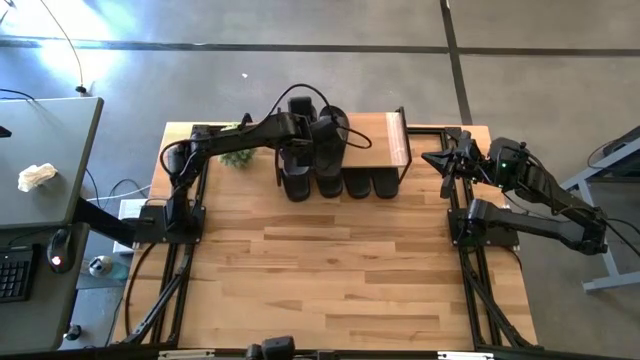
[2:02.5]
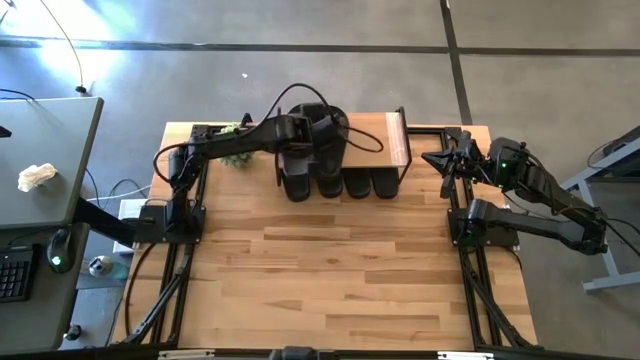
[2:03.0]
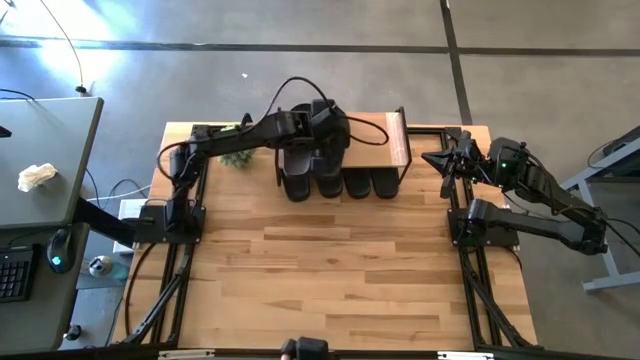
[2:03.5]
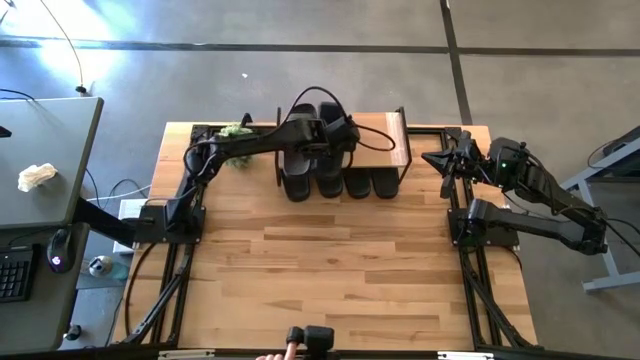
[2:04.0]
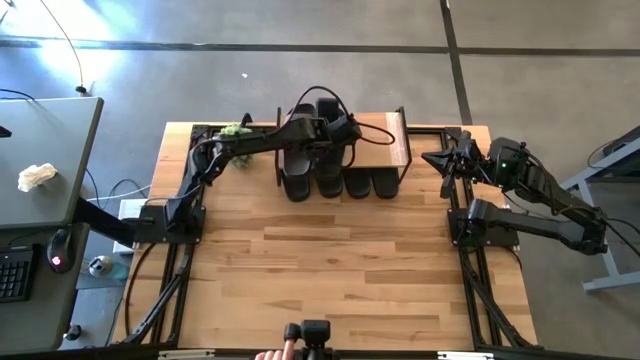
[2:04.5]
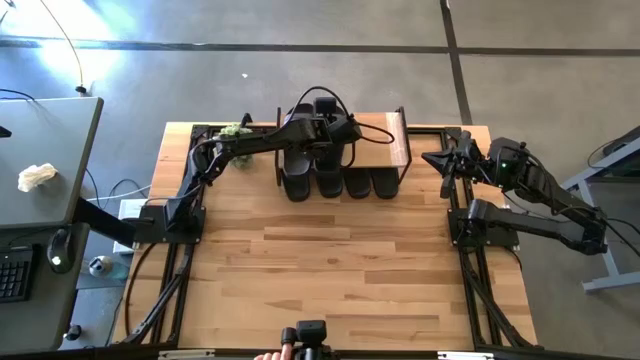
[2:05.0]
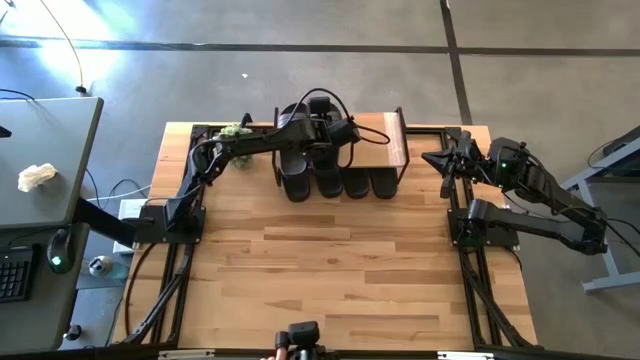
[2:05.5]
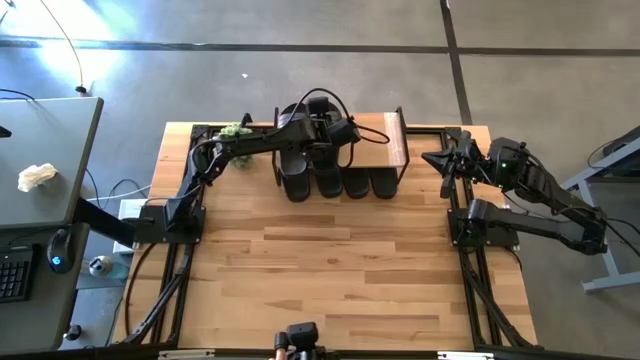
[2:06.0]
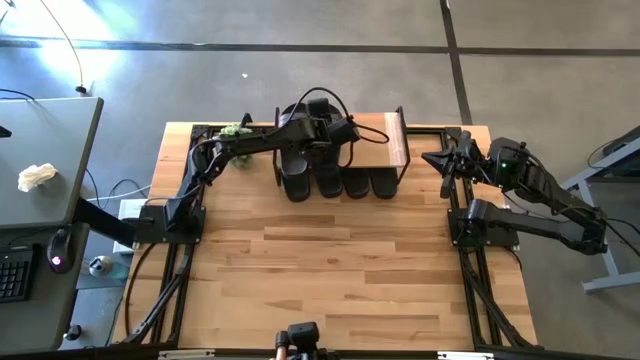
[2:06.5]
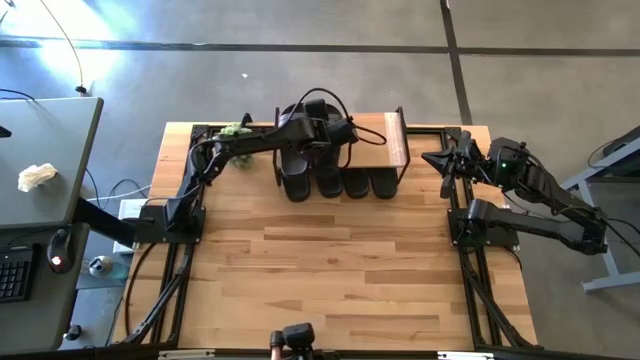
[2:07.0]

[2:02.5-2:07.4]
Task: Pick and place slides into the shelf
Adjust the black slipper on the shelf

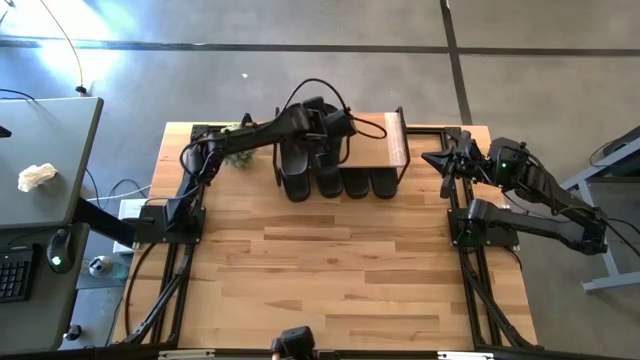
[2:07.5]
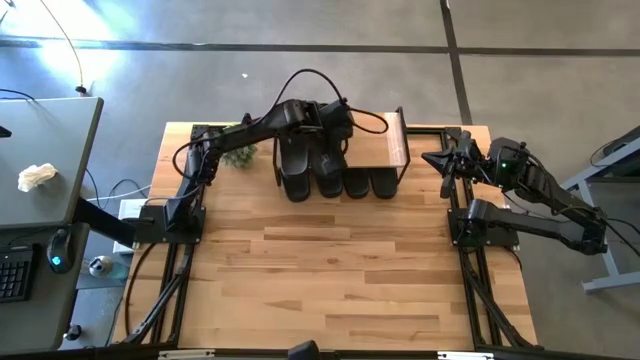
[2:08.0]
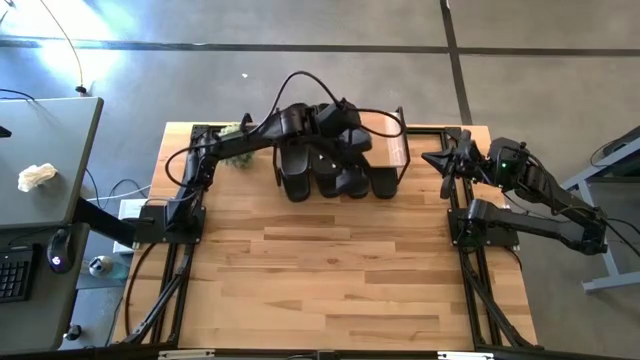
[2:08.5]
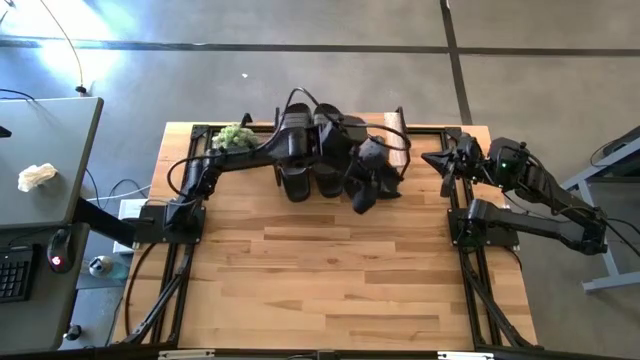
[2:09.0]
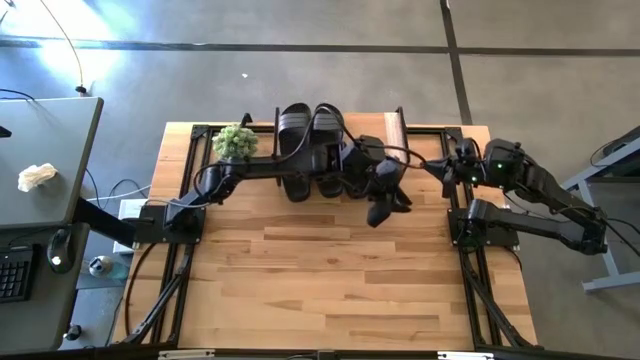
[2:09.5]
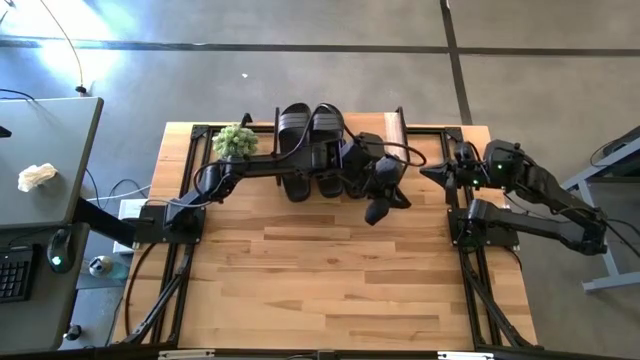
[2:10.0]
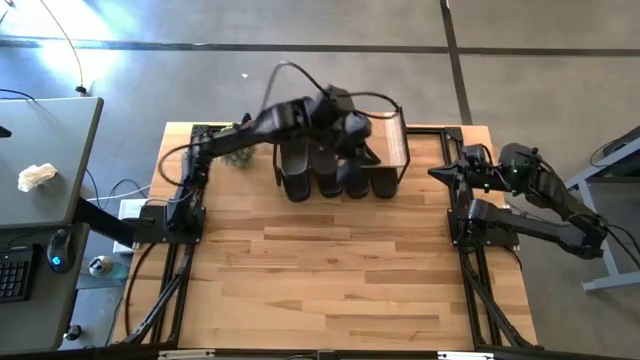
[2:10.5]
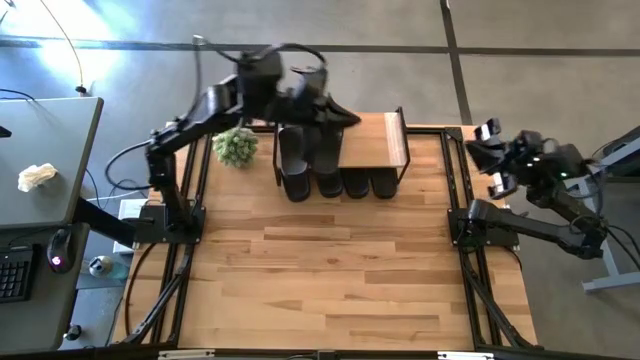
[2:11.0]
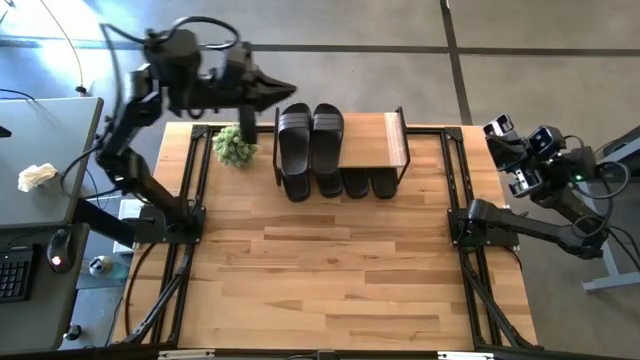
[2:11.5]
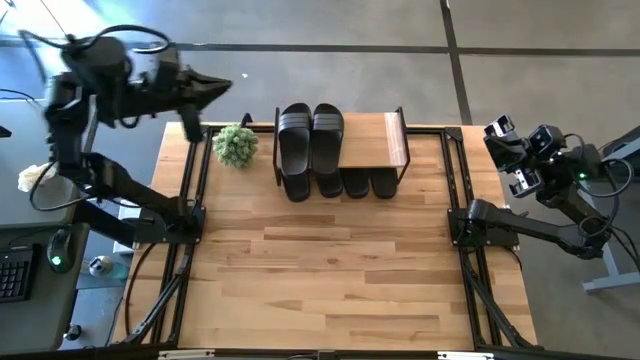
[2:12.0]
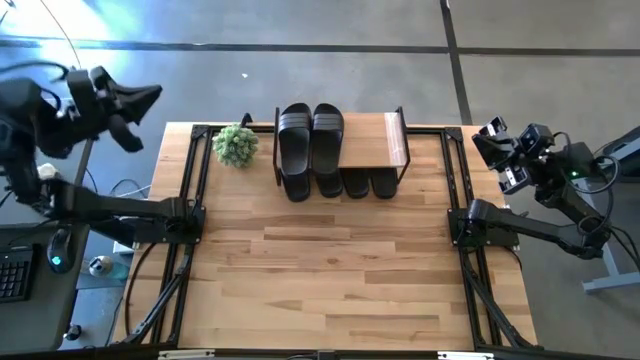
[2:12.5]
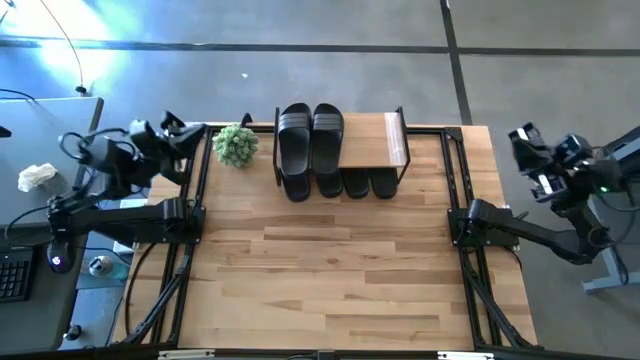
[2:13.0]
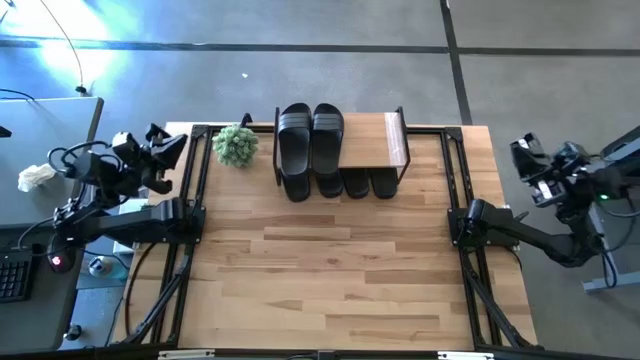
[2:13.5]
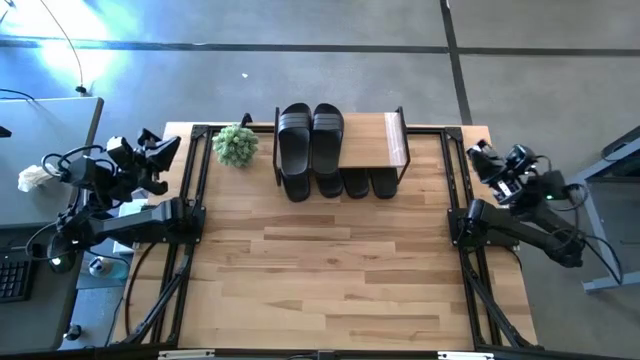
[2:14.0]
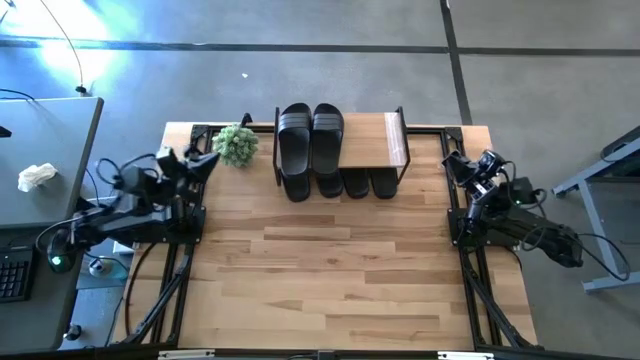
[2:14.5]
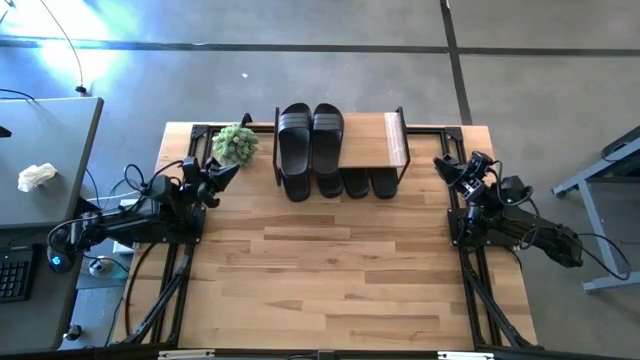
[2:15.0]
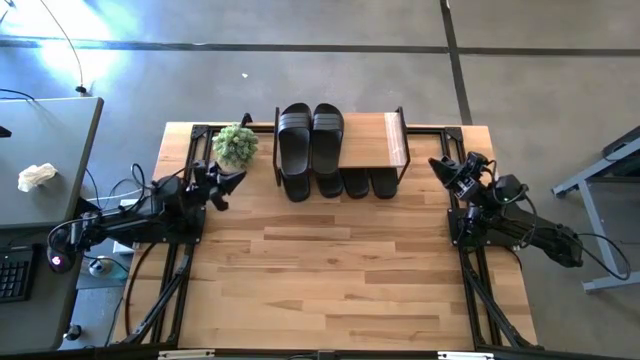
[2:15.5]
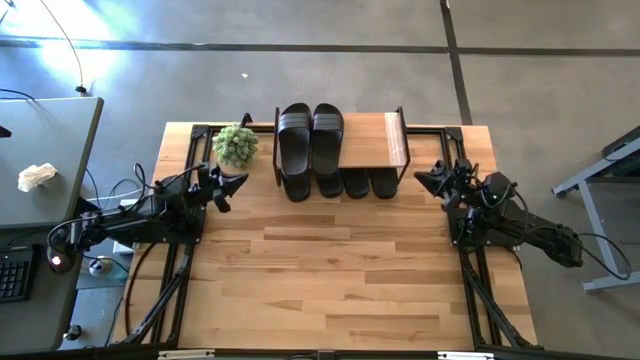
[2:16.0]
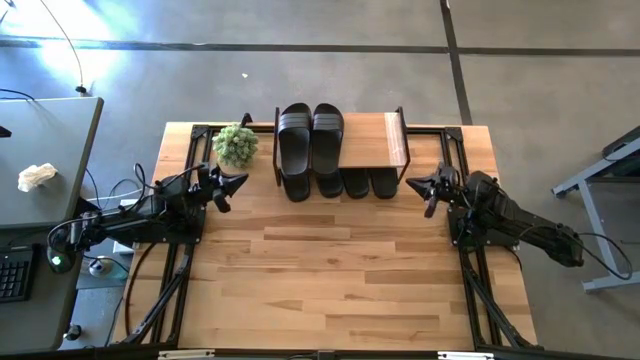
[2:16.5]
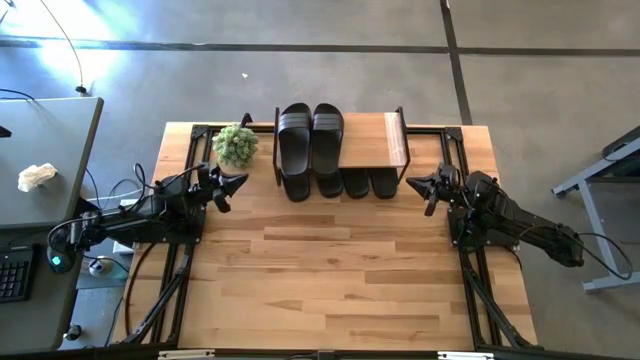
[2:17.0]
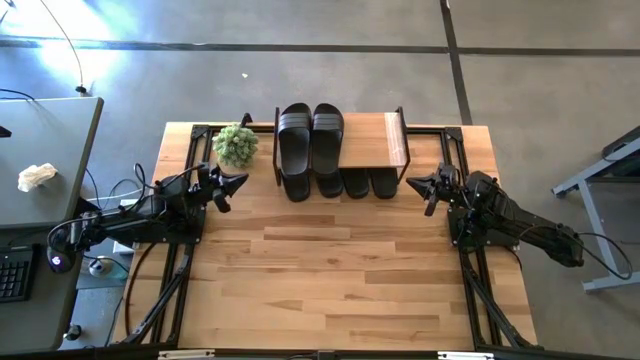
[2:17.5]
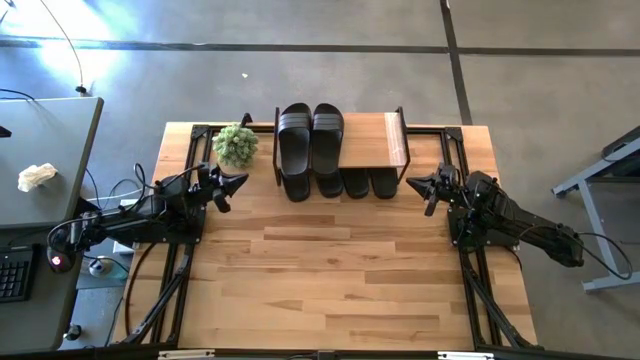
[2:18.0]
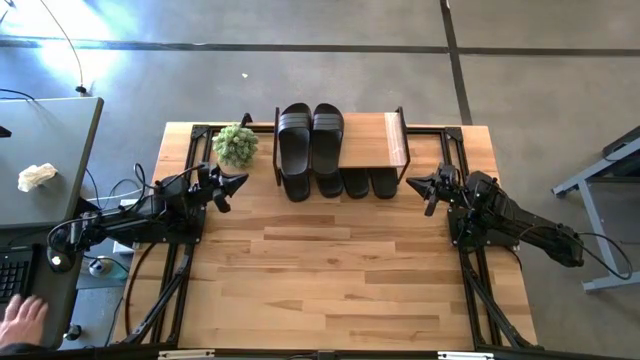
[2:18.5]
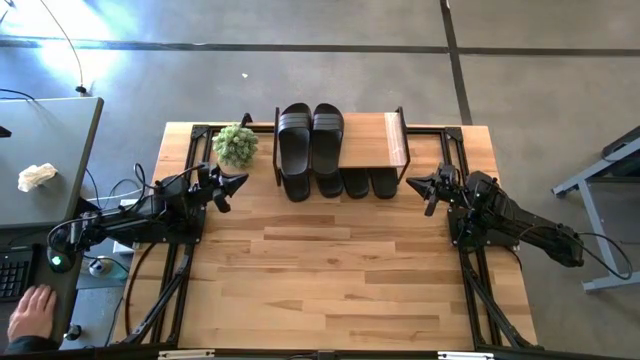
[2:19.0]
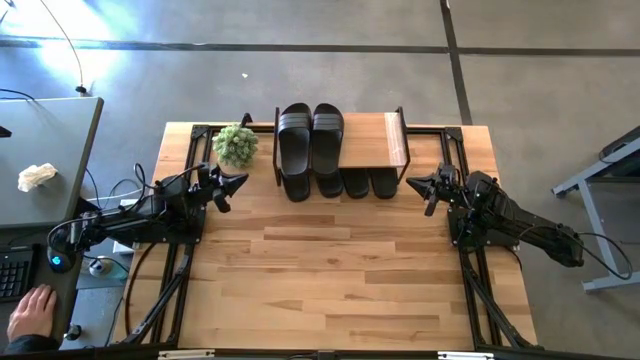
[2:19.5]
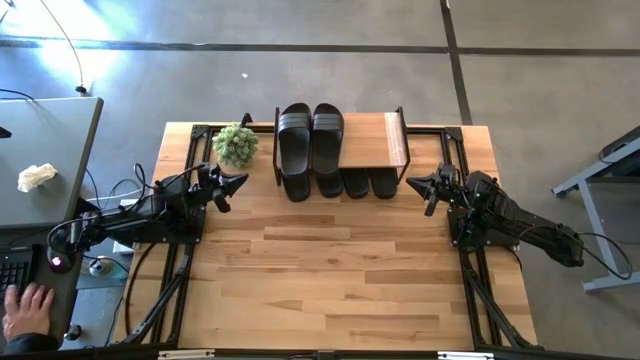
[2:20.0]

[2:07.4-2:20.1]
Return to Home Position

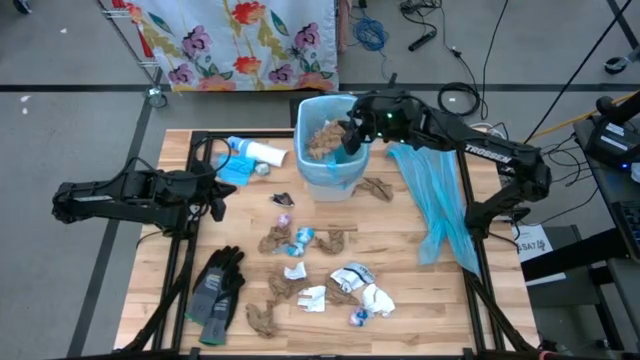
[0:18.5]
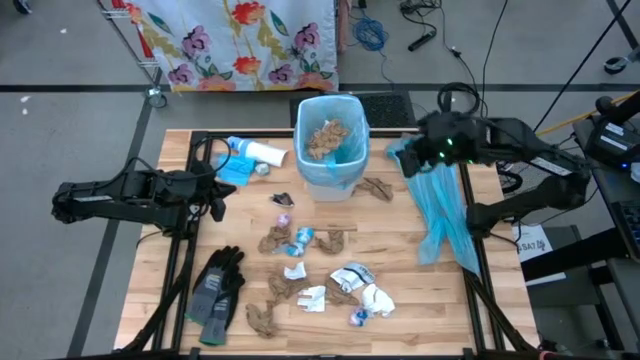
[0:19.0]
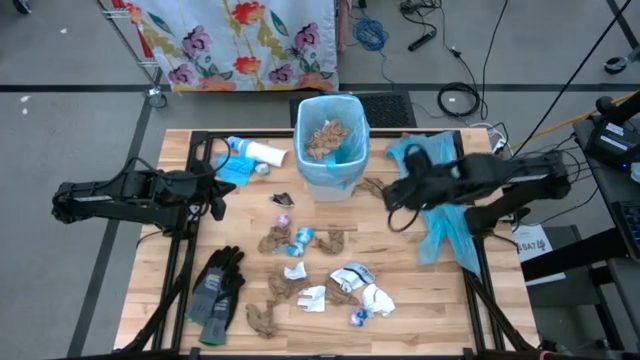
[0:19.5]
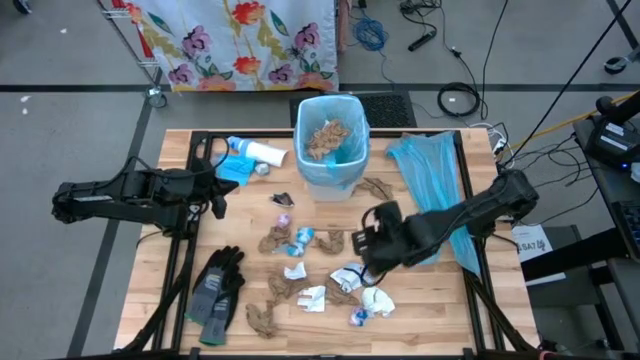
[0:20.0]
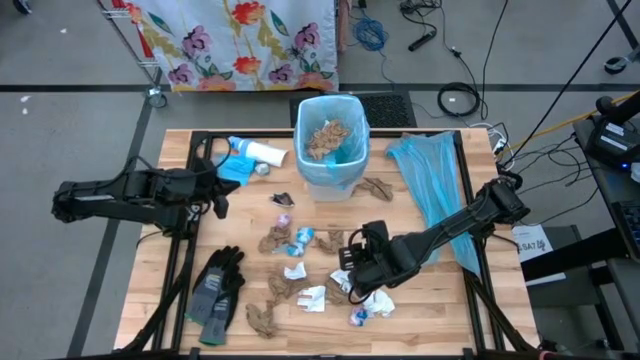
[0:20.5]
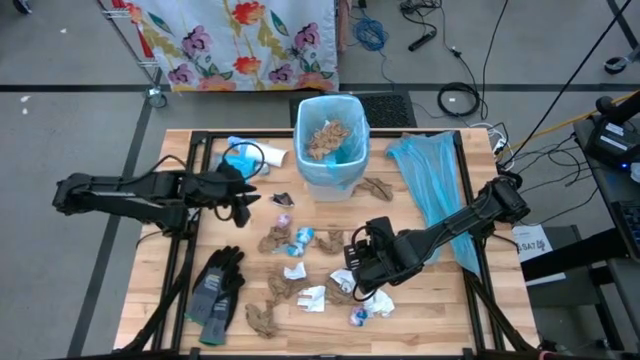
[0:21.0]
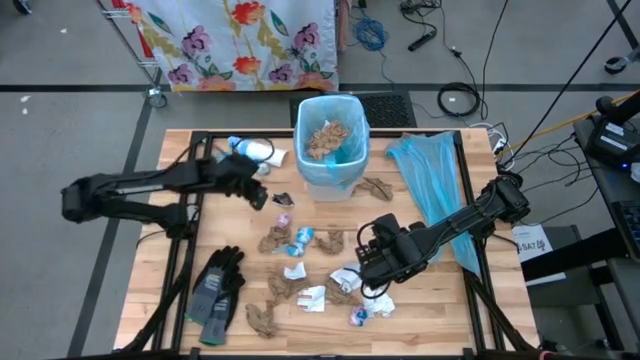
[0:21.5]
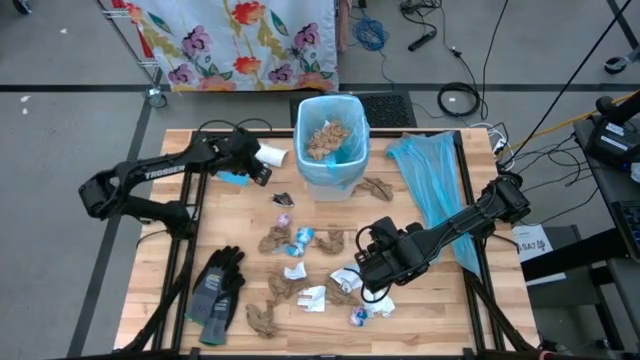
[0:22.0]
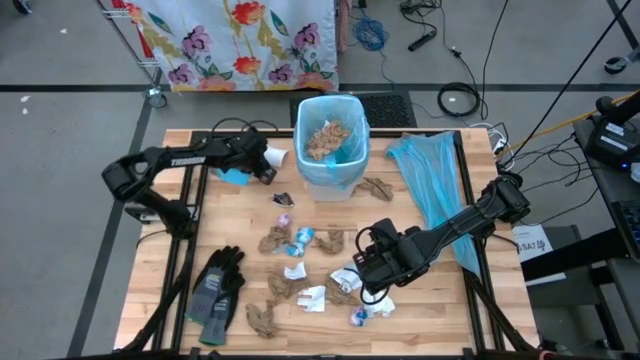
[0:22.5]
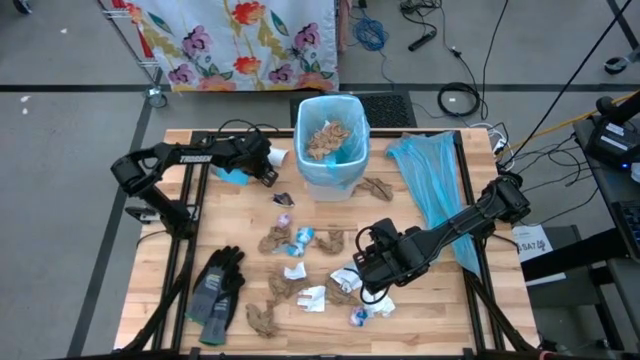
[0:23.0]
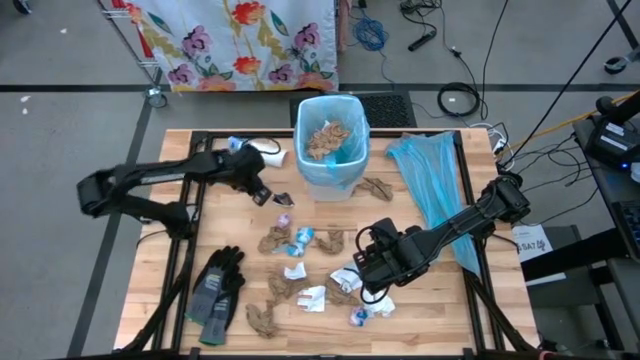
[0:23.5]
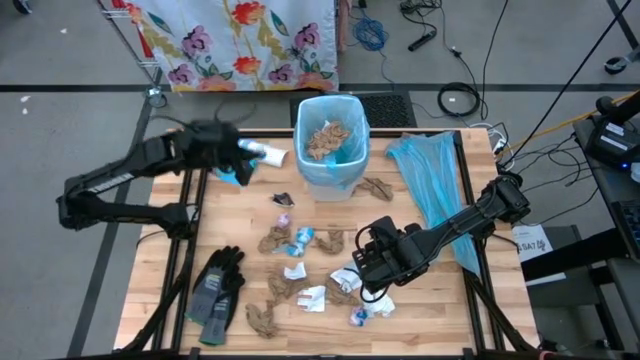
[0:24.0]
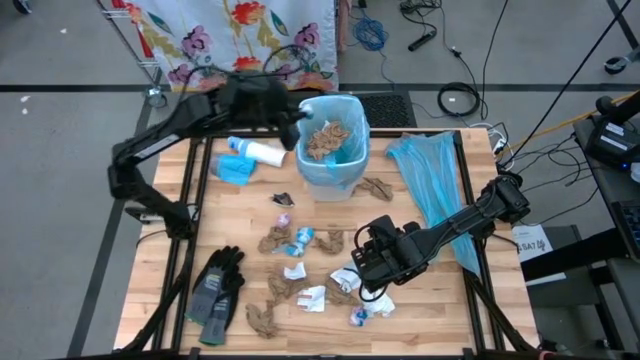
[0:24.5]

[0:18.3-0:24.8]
Task: place trash/remove bag and relplace
Put the white trashbag into the trash bin
